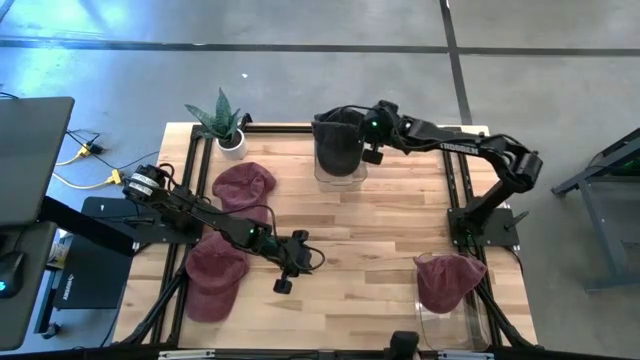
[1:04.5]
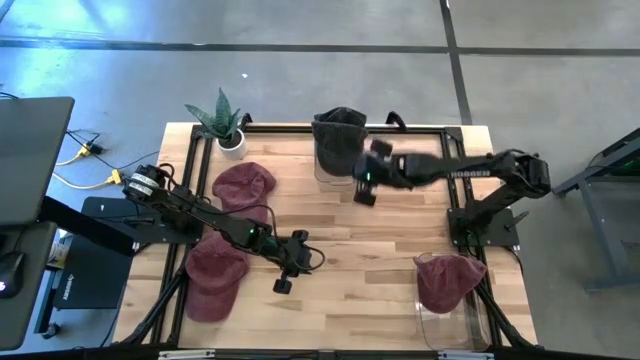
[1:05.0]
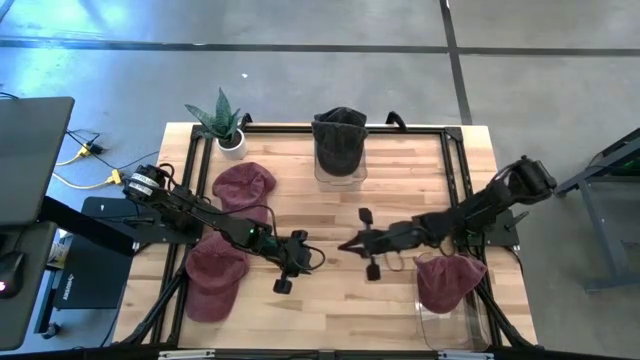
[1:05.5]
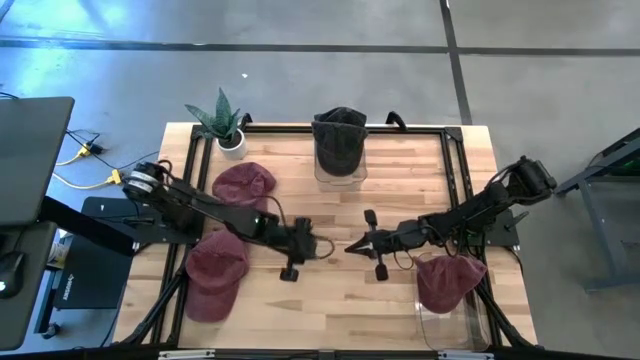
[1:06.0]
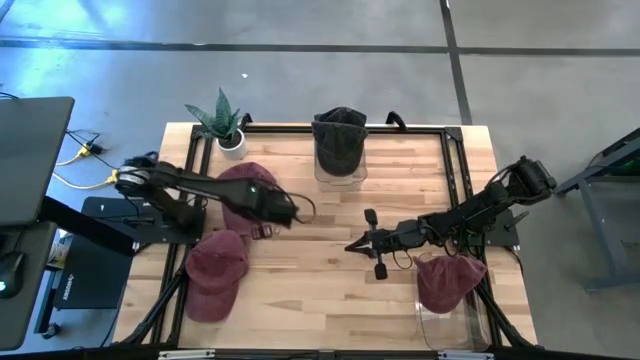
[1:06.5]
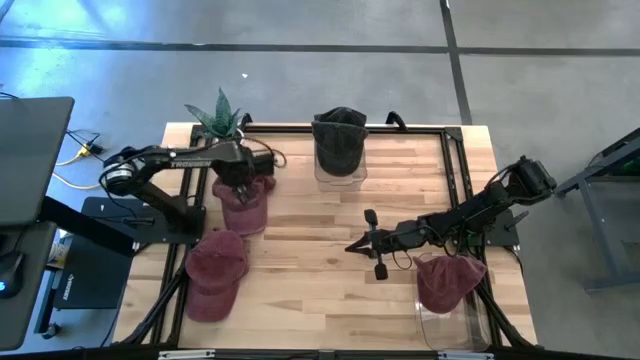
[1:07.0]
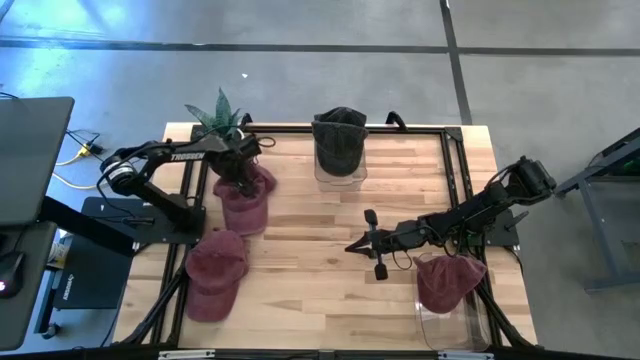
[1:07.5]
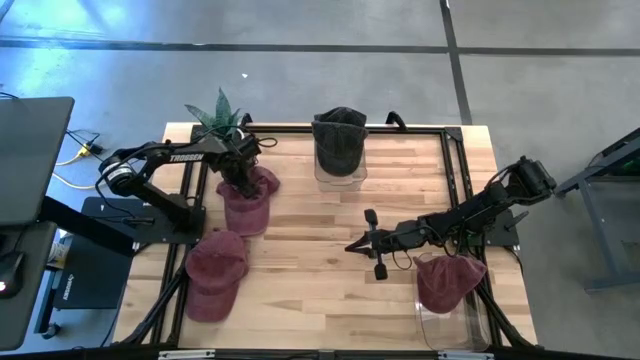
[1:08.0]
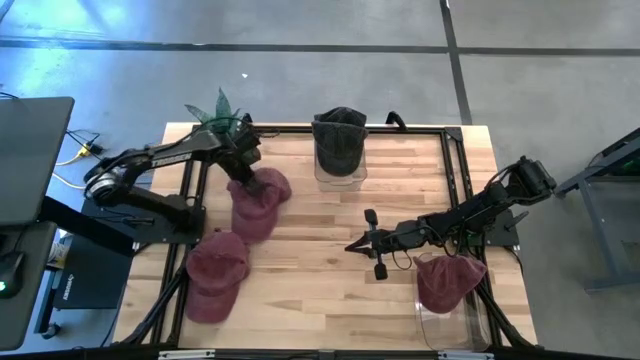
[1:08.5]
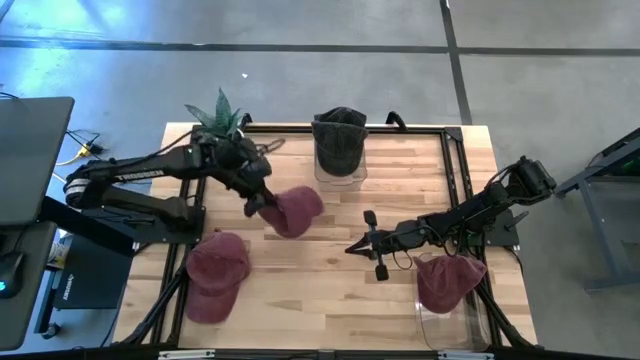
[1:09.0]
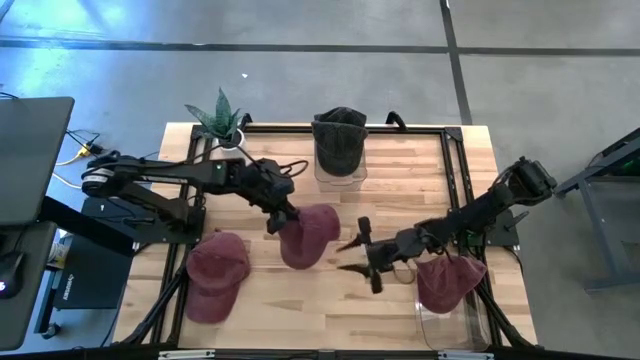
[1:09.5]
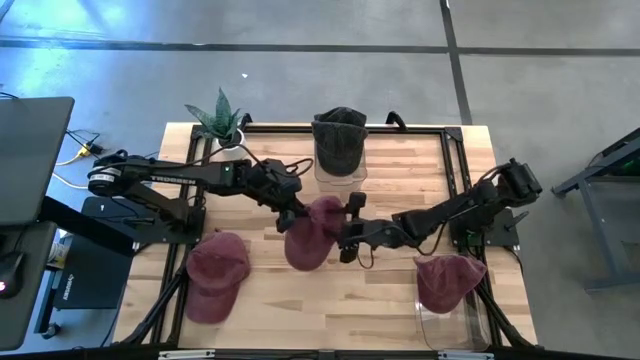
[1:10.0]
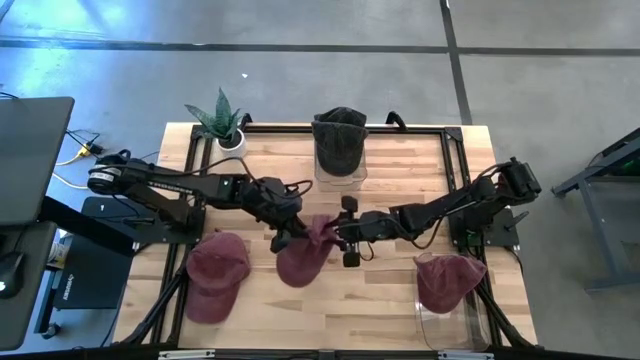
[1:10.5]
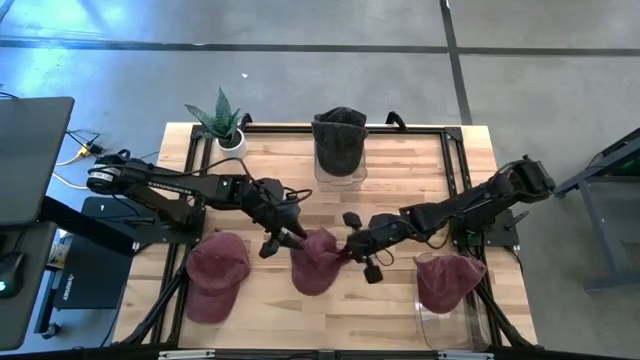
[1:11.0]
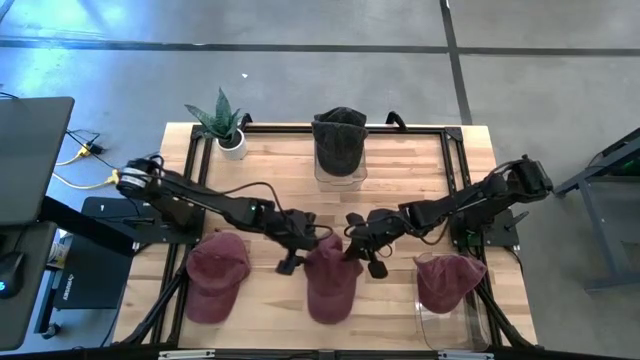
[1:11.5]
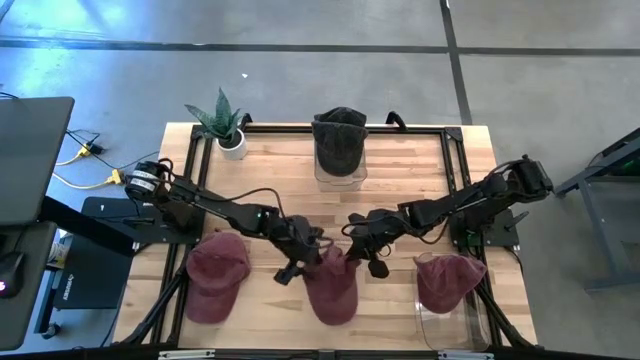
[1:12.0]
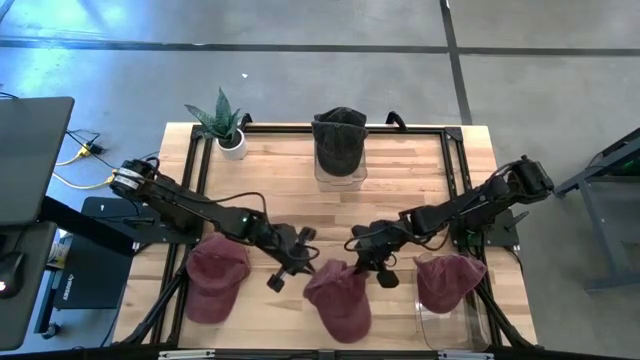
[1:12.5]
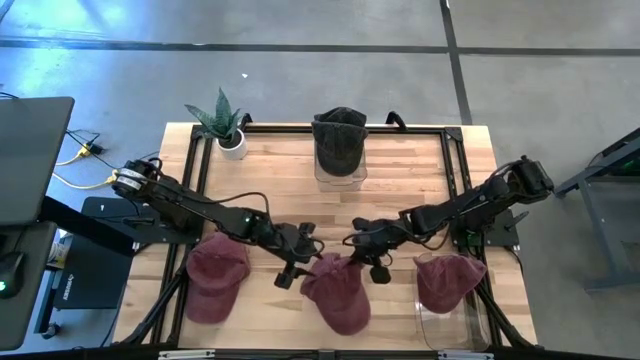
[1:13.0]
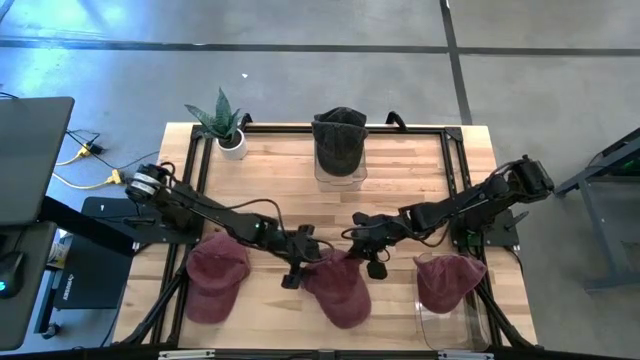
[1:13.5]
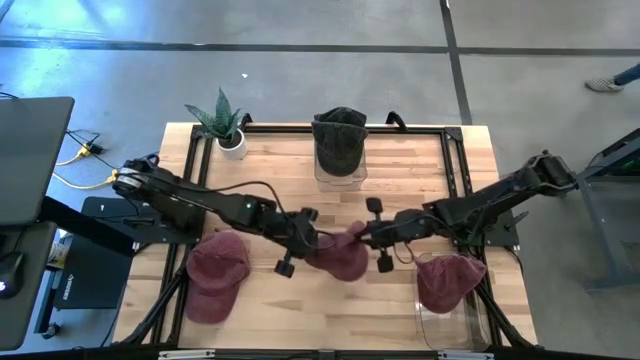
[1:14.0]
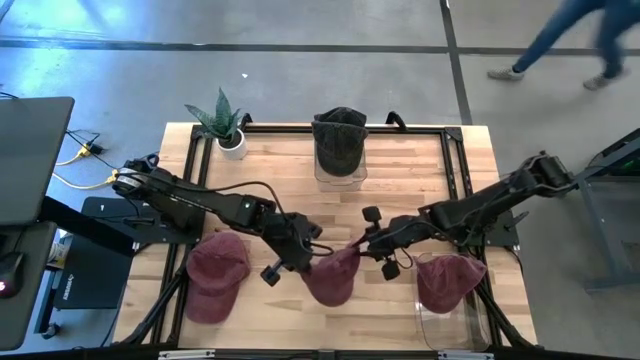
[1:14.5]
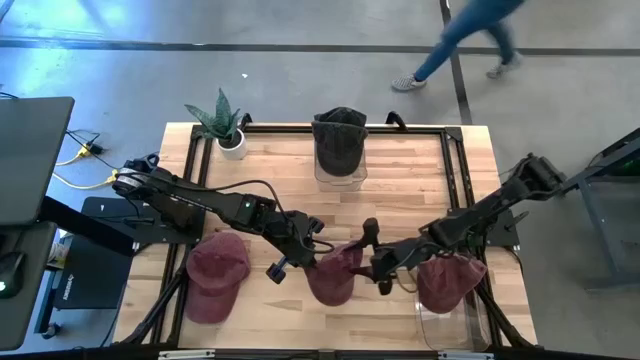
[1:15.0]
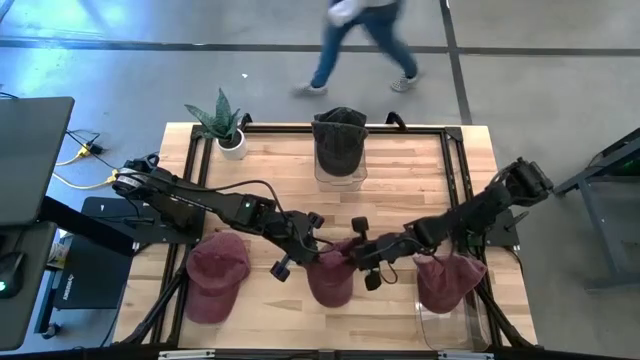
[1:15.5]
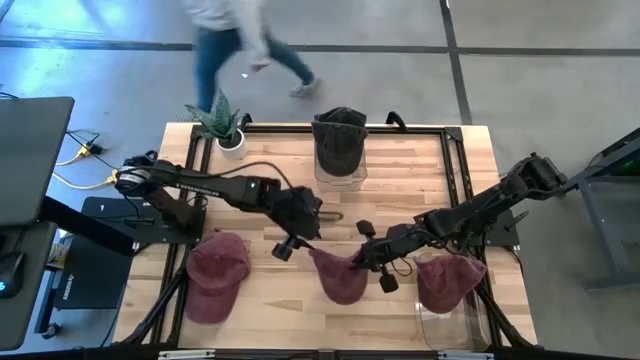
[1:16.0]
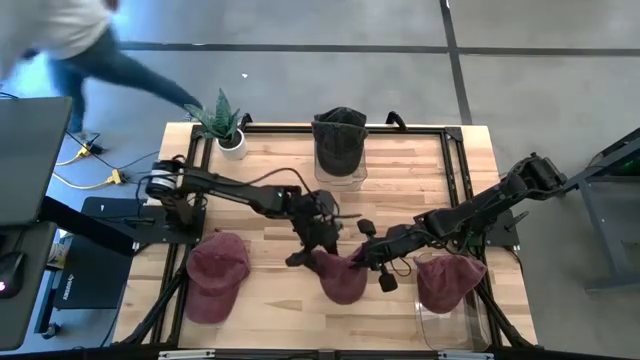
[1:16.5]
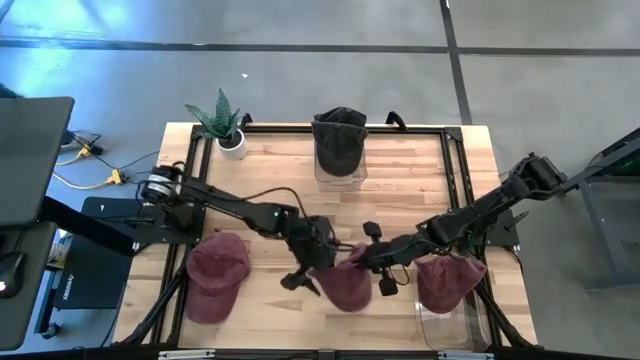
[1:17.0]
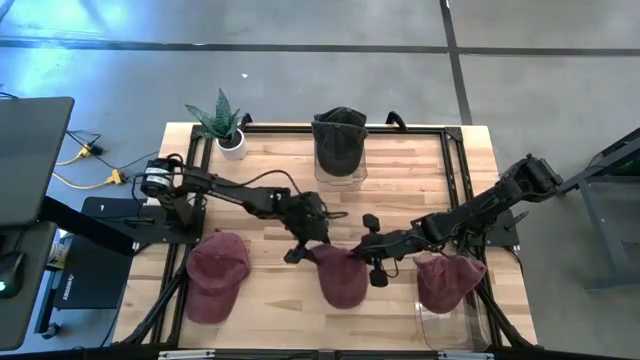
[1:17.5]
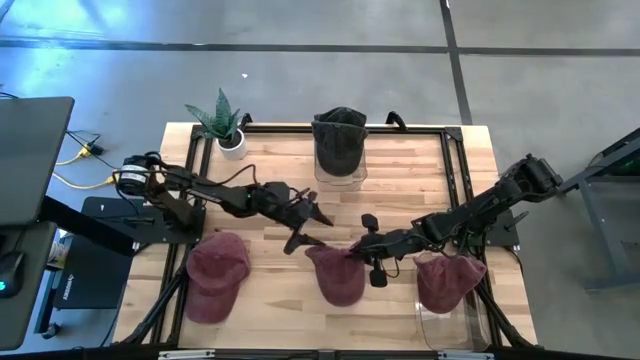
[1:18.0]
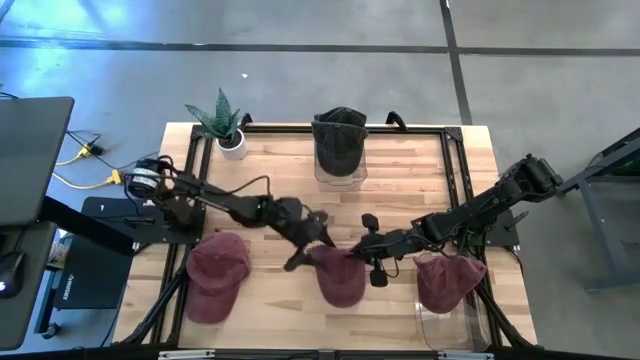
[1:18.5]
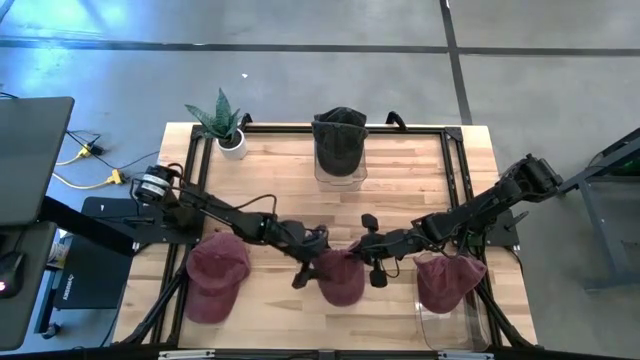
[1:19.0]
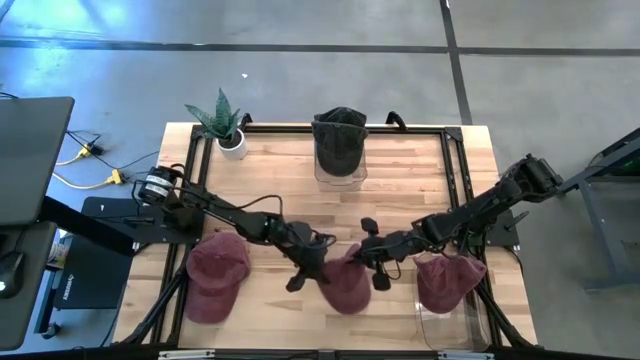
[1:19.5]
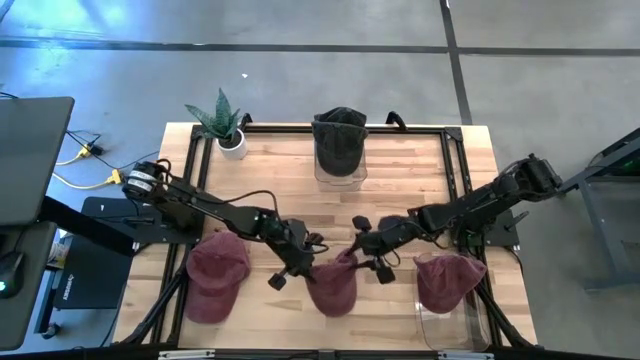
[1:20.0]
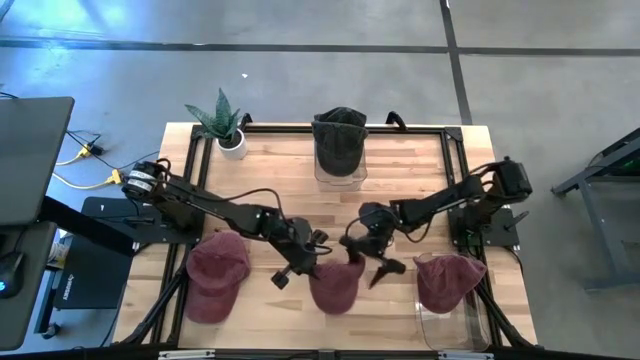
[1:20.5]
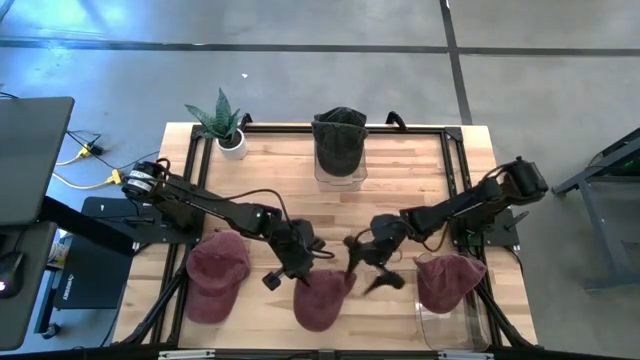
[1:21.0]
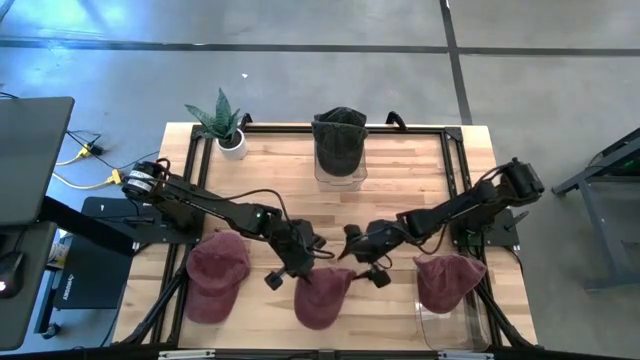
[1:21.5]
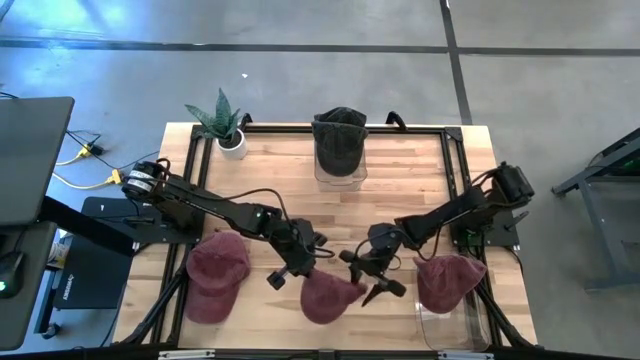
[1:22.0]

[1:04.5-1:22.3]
Task: Pick & Place hat
Put the top red cap into the bottom transparent bin

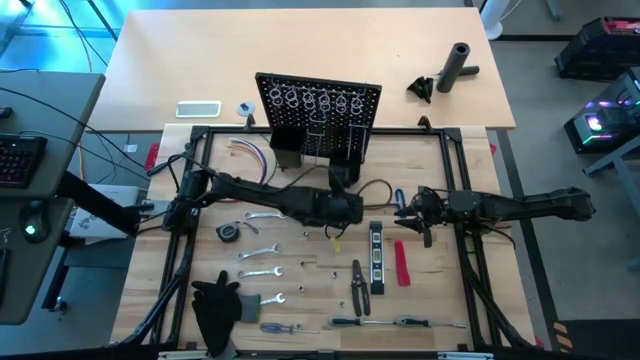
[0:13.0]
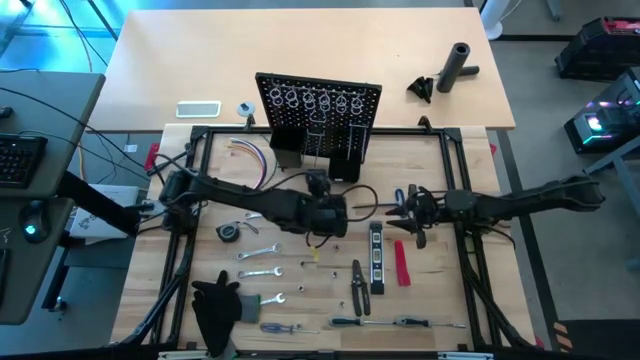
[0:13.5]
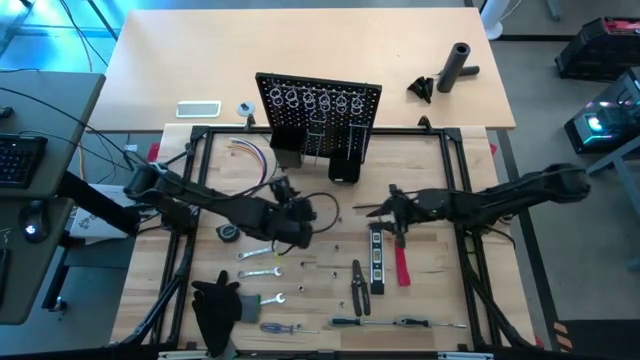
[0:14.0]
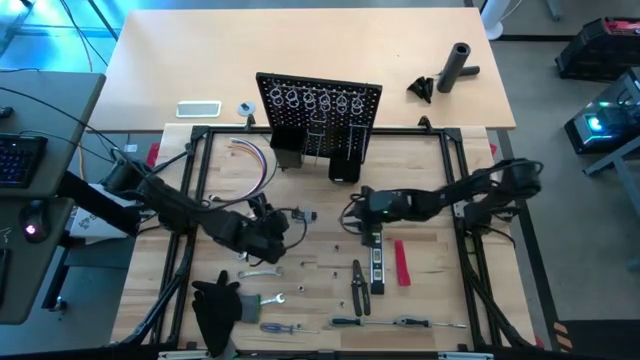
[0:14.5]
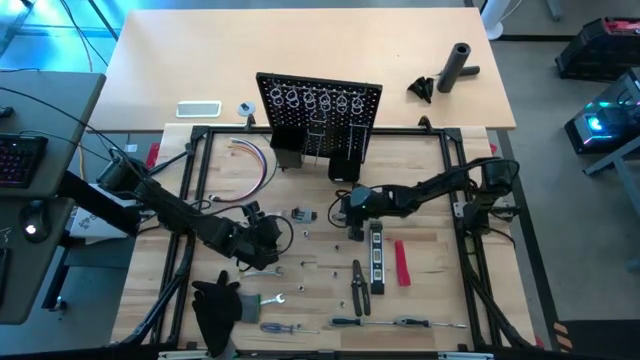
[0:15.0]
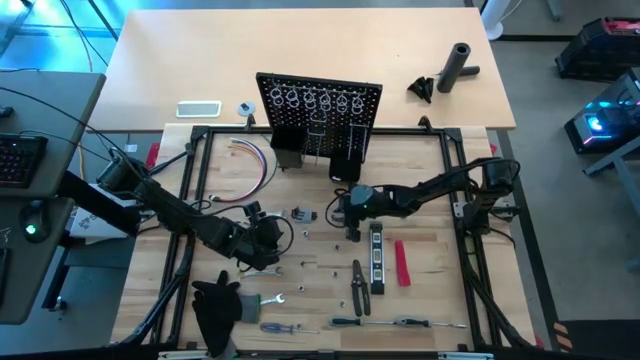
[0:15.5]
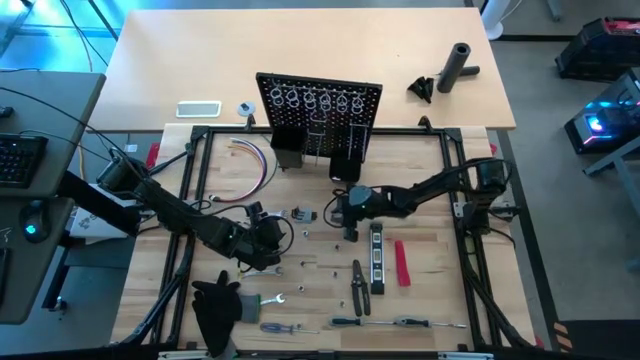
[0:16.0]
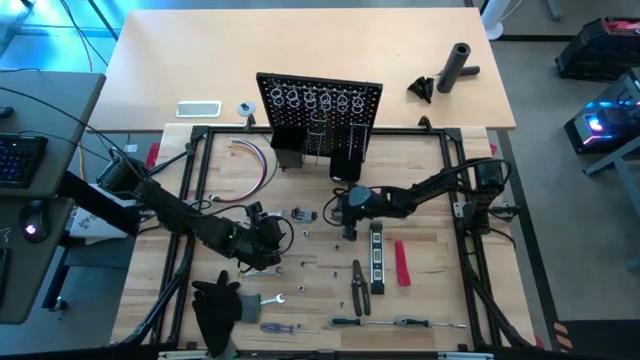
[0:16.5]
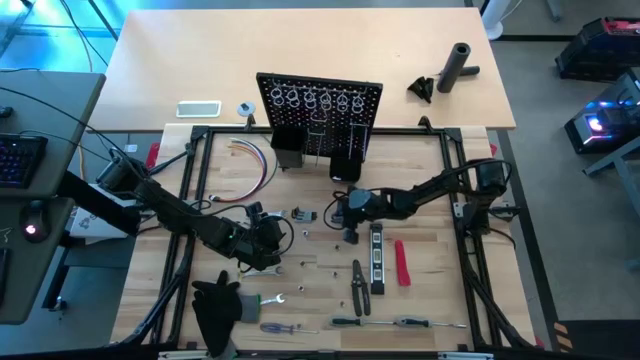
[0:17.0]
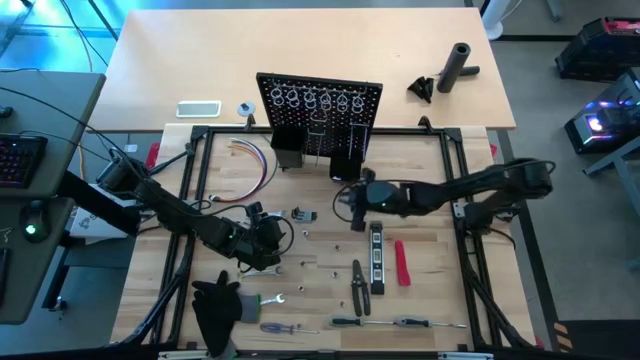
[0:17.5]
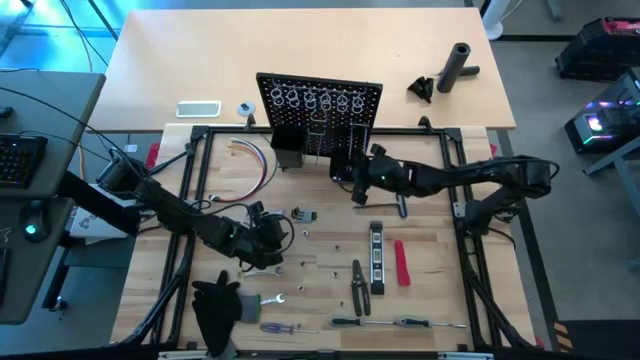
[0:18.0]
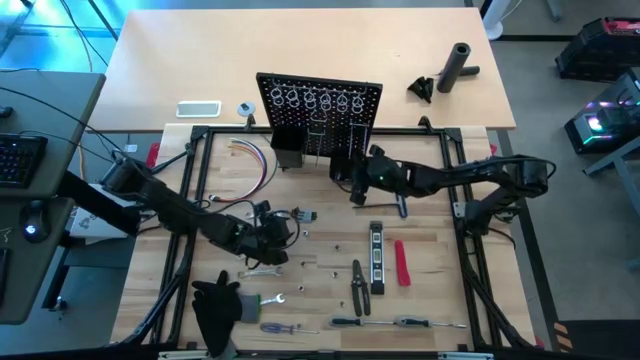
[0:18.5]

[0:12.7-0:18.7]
Task: Hang tools onto peg board
Put the socket into the small black bin on the black pegboard
